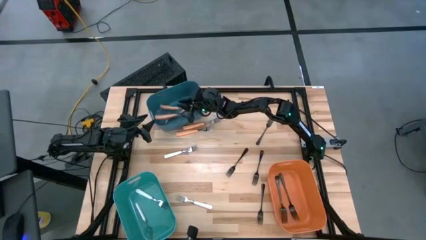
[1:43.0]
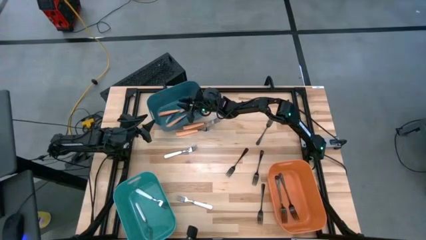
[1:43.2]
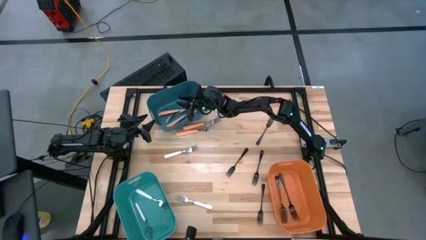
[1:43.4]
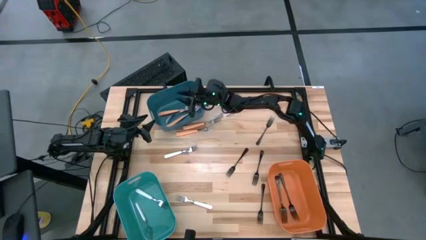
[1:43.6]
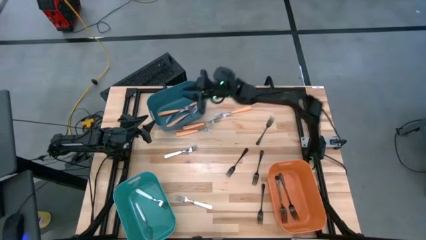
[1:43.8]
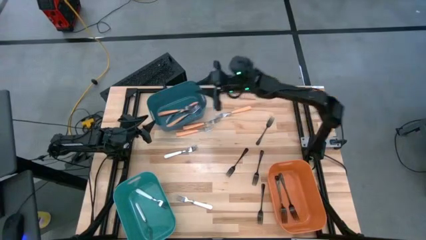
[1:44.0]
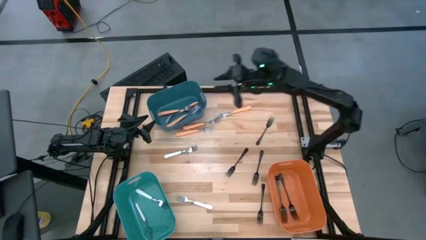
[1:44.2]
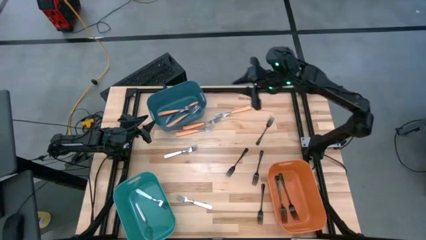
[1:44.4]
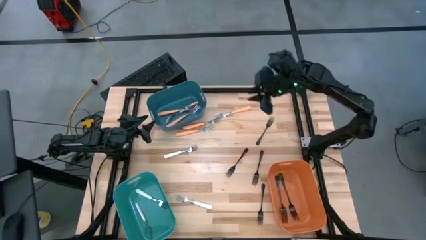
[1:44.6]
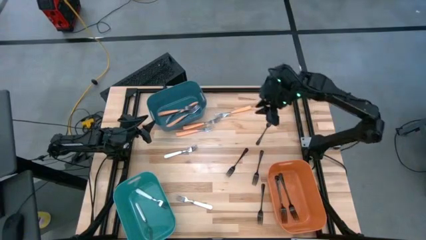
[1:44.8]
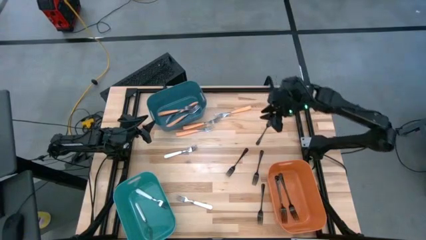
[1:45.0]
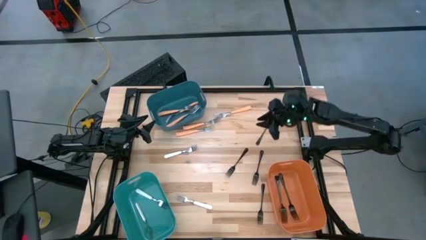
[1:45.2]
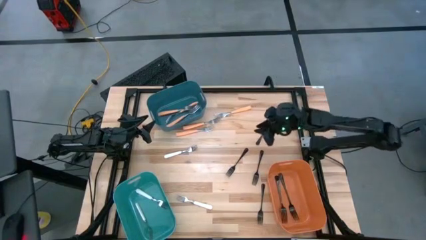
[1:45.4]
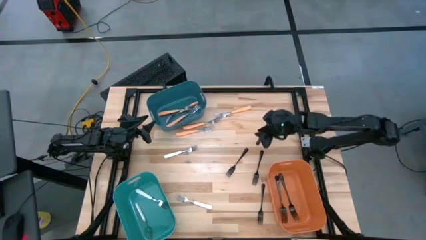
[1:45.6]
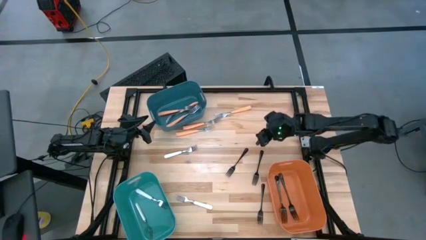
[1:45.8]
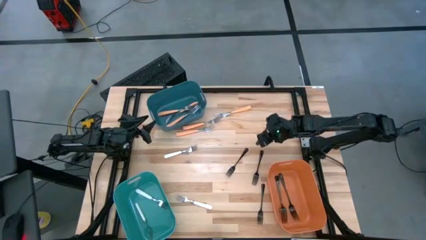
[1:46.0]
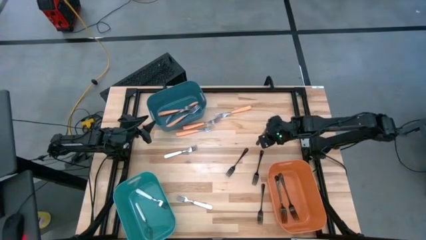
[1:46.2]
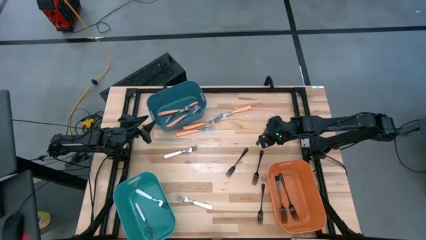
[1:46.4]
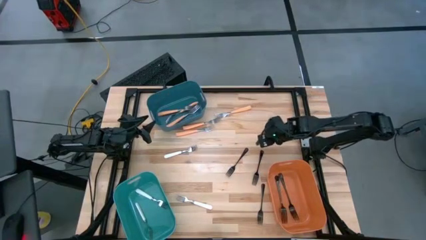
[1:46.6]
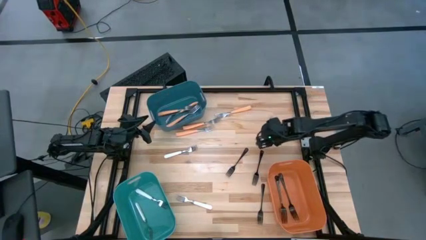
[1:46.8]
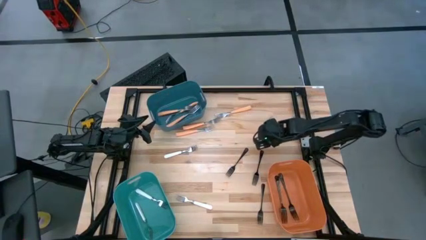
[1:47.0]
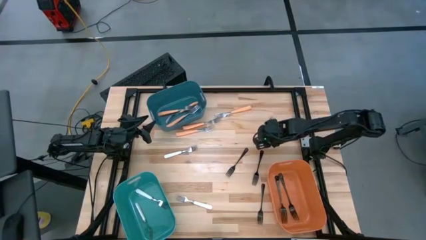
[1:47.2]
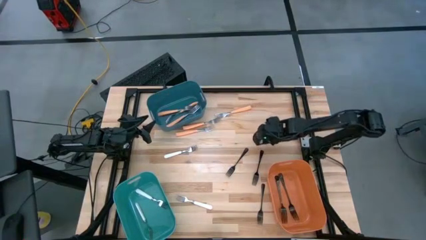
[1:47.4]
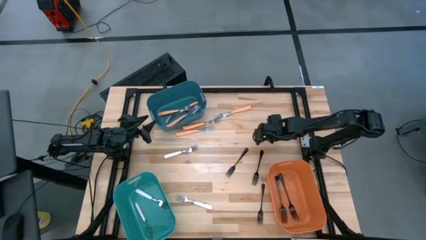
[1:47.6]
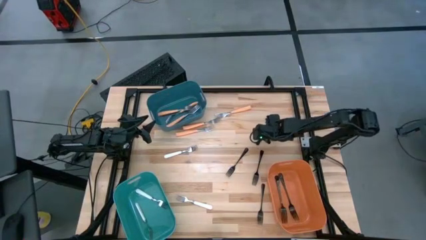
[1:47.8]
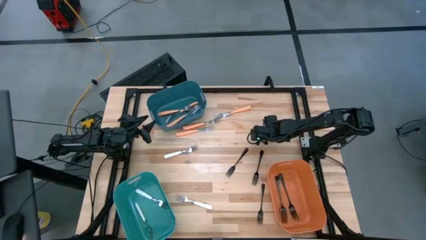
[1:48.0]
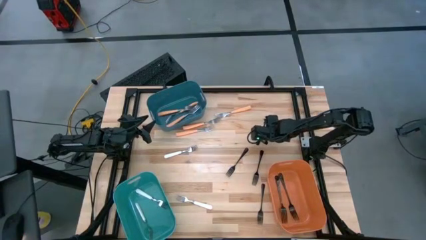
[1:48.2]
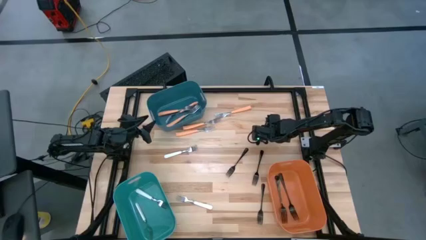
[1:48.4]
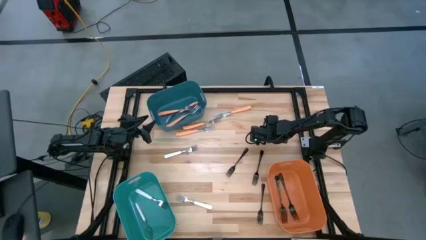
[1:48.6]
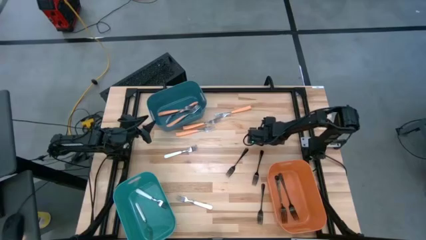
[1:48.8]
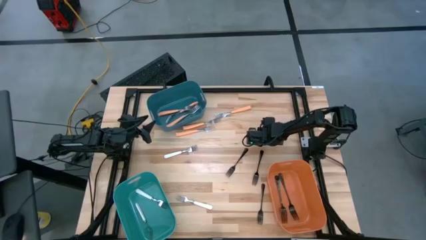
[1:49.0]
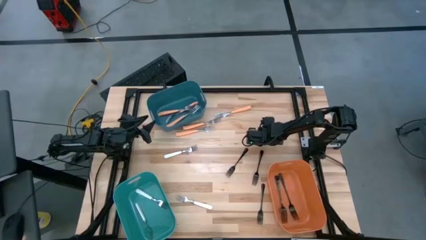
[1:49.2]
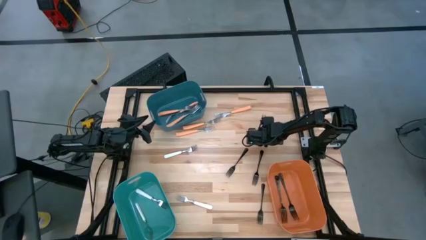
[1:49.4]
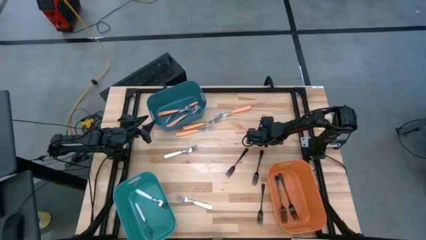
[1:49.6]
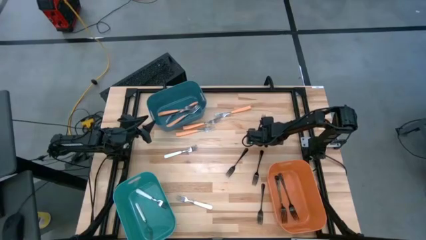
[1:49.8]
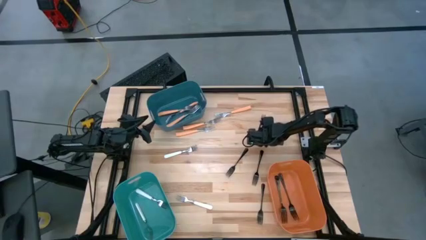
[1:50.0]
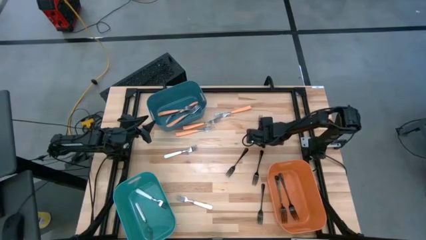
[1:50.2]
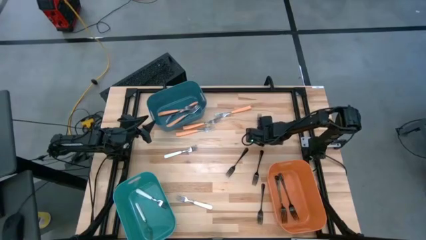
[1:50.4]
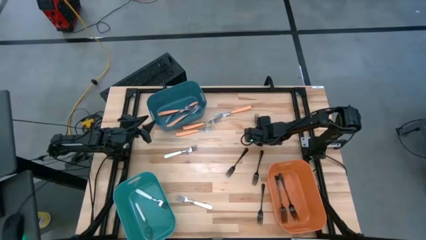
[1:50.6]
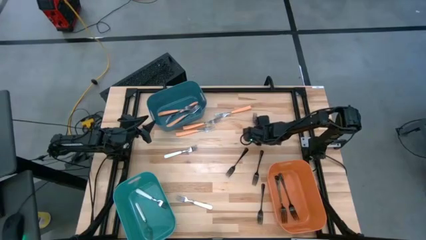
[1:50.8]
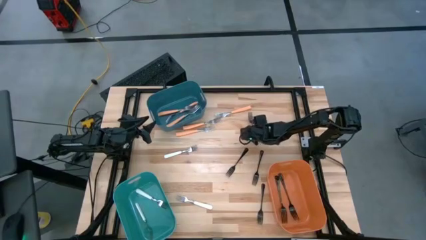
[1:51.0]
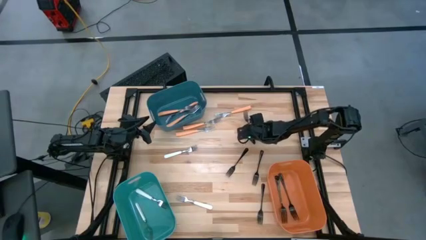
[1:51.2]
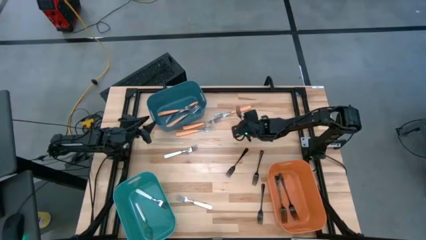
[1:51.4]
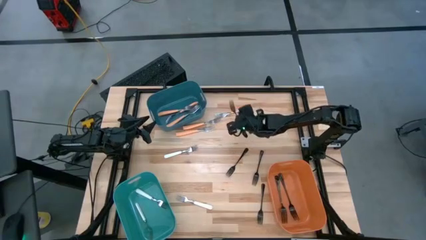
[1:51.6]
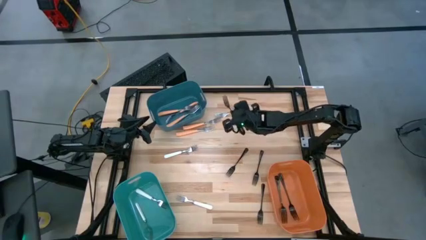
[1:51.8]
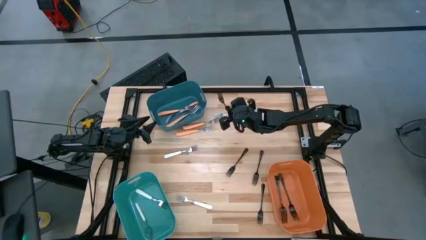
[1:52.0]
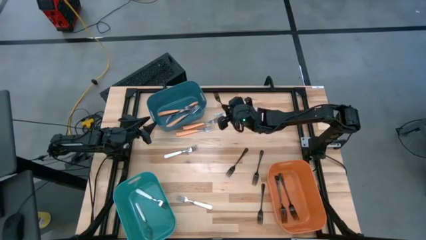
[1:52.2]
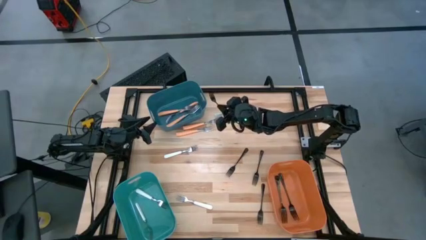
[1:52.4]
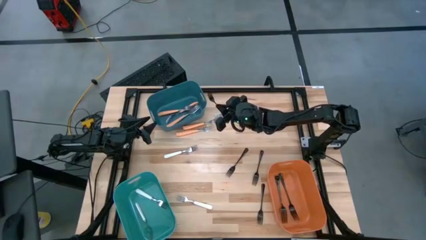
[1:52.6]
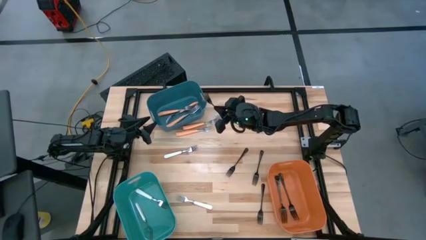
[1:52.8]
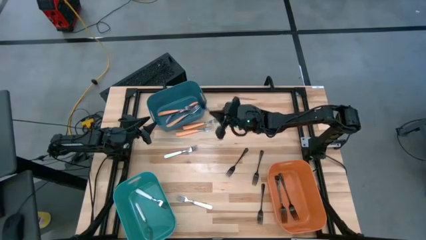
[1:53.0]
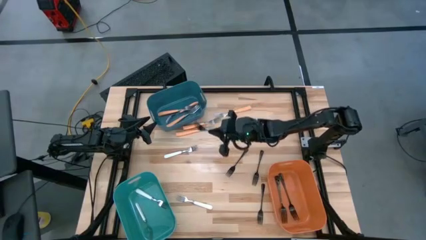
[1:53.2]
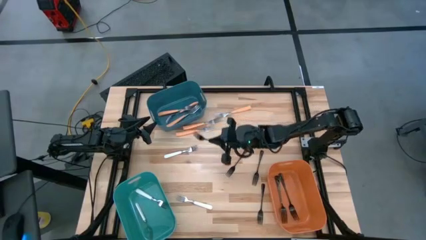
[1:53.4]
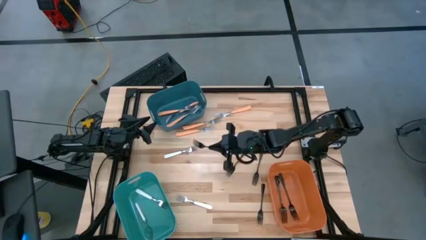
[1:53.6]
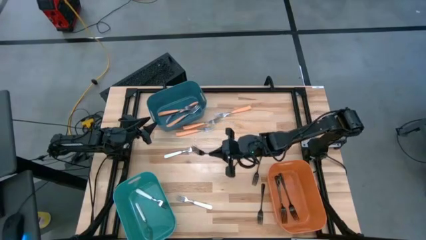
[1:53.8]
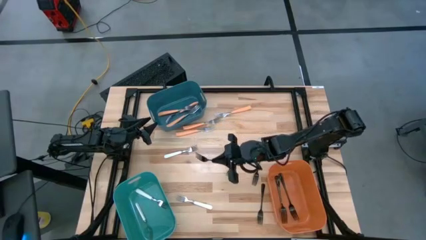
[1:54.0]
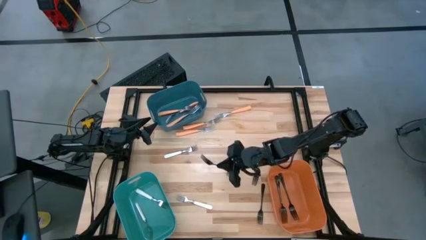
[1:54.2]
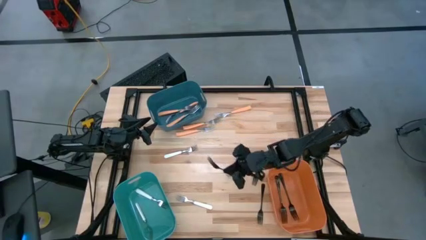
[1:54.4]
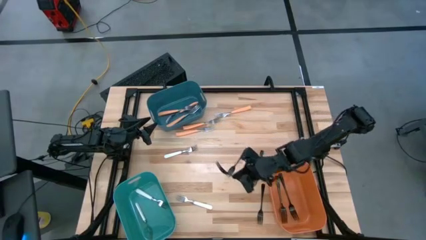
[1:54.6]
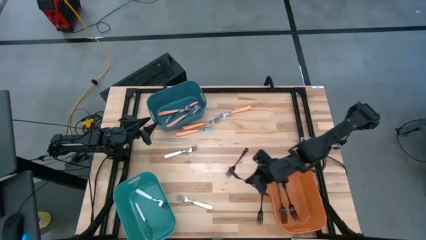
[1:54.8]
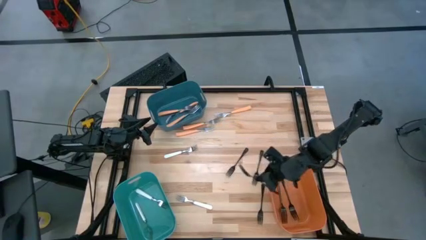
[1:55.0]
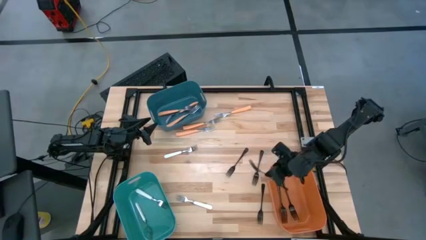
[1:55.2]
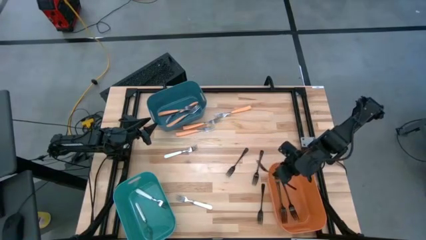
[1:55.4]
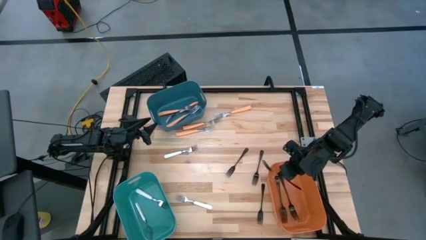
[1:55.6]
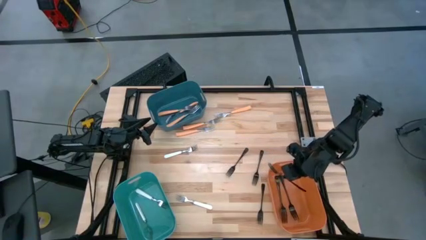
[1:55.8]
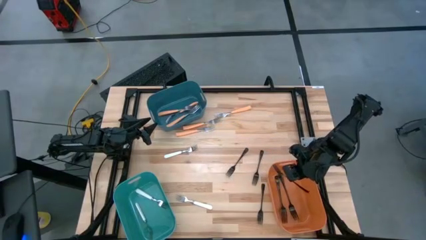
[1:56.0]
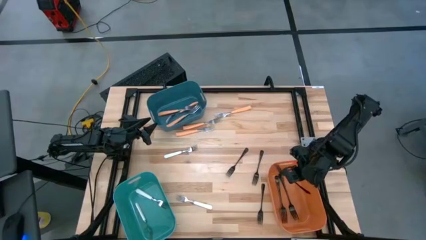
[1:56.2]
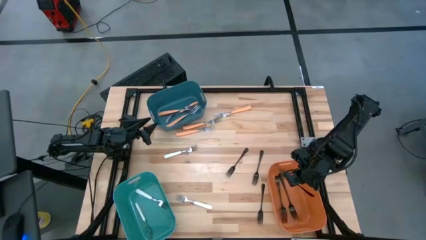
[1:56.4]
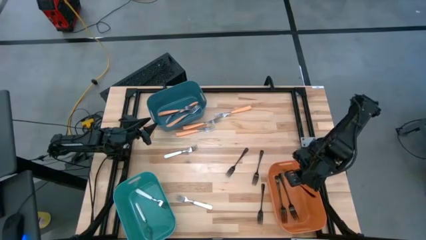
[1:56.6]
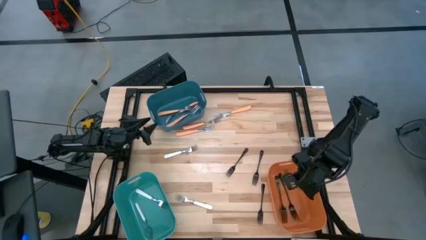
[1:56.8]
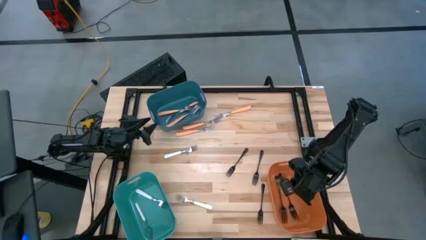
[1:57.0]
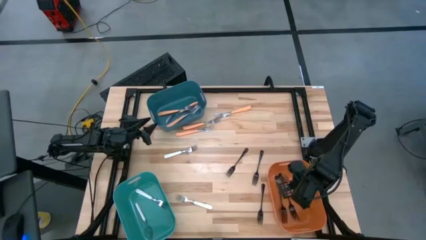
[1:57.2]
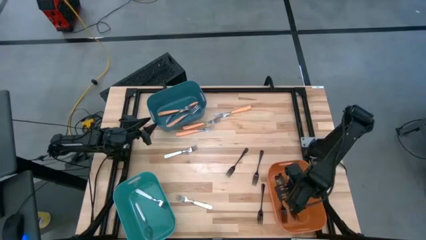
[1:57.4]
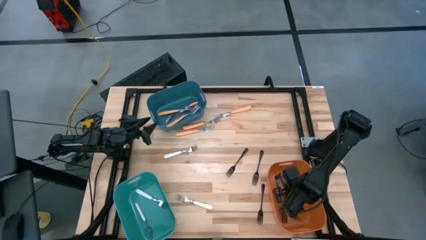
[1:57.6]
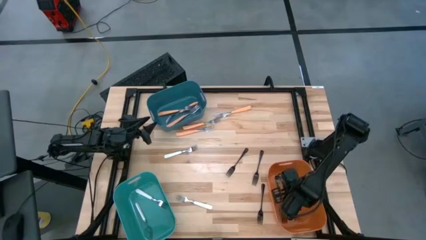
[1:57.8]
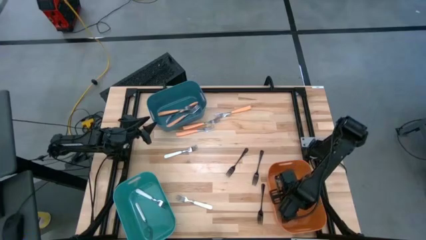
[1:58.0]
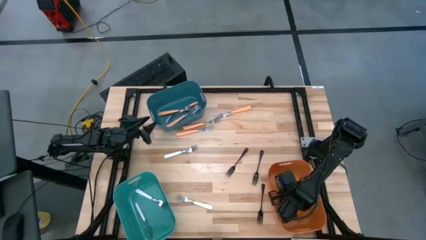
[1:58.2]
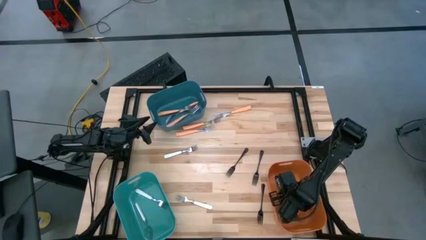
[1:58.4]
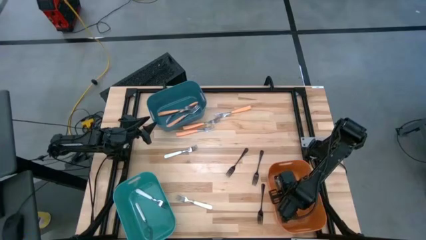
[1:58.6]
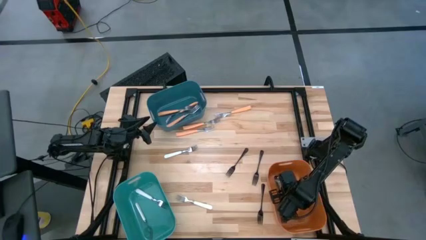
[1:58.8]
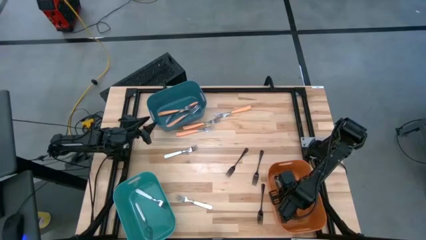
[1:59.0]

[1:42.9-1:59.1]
Task: Sort silverware by color (type)
Put the black fork into the orange bin
